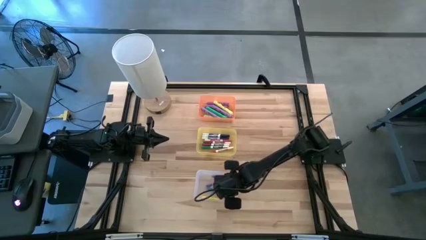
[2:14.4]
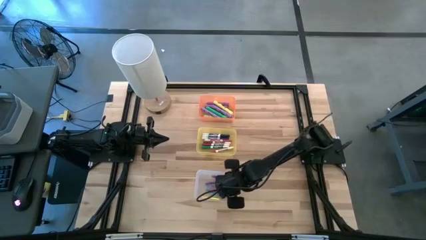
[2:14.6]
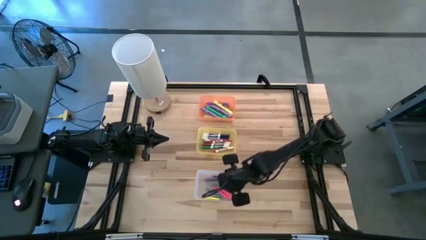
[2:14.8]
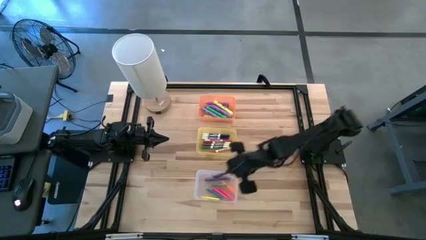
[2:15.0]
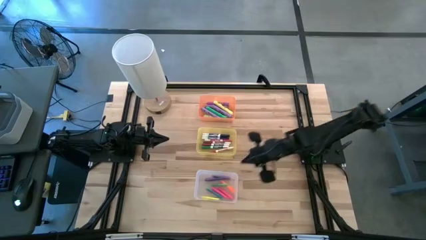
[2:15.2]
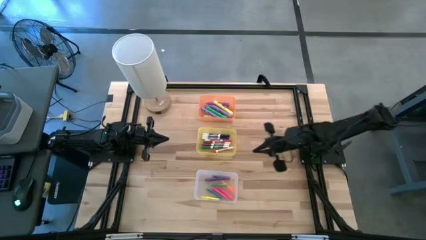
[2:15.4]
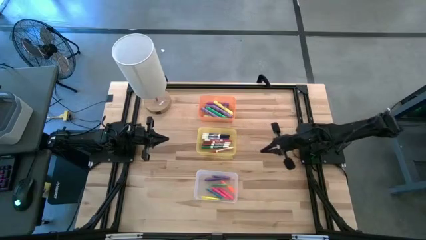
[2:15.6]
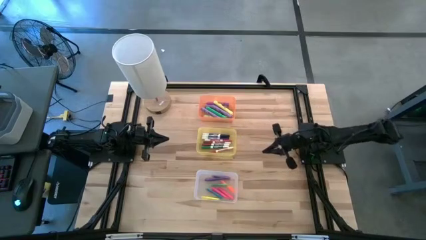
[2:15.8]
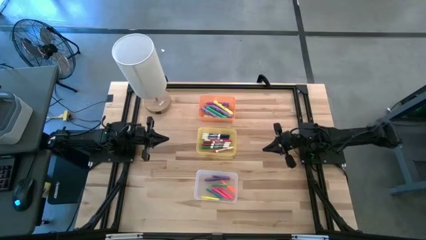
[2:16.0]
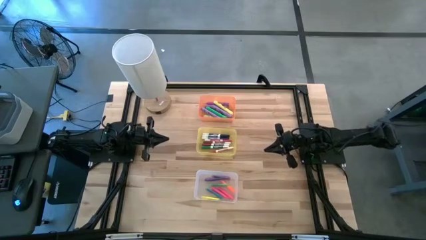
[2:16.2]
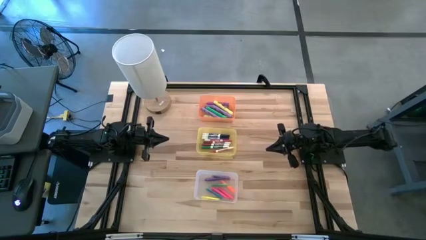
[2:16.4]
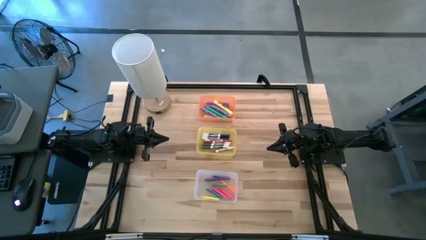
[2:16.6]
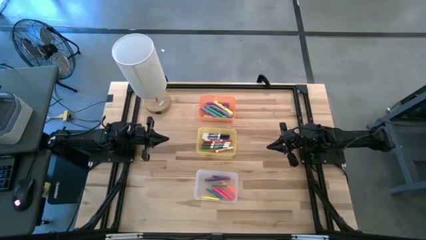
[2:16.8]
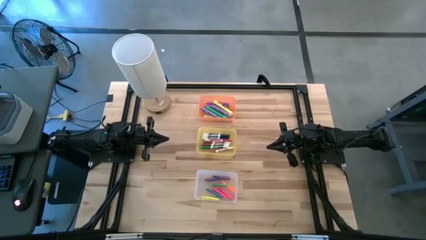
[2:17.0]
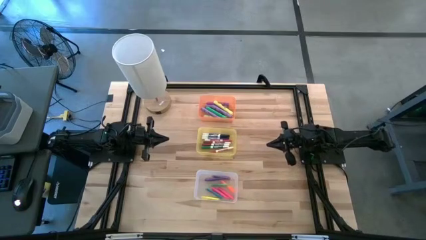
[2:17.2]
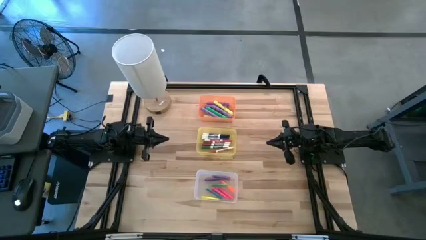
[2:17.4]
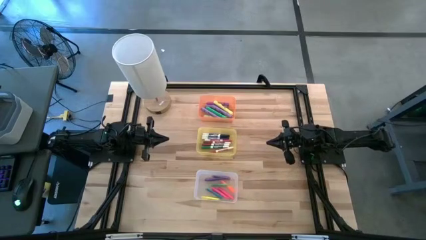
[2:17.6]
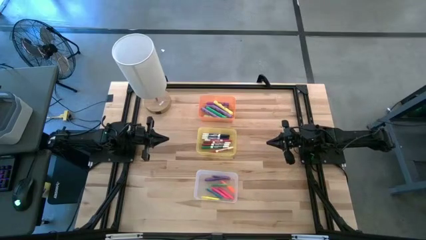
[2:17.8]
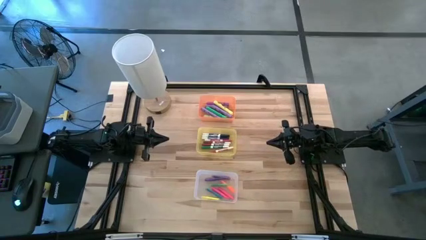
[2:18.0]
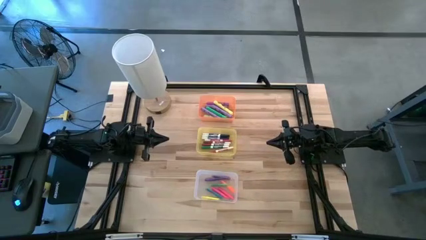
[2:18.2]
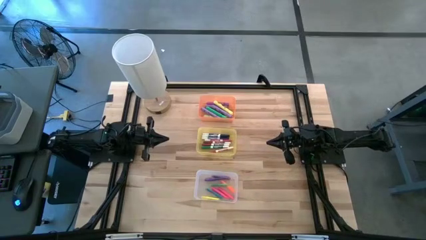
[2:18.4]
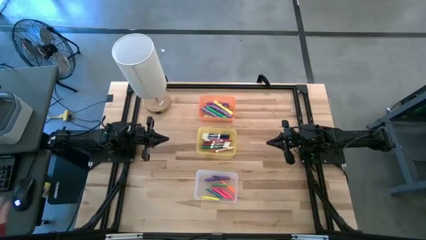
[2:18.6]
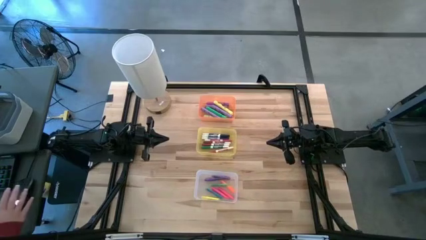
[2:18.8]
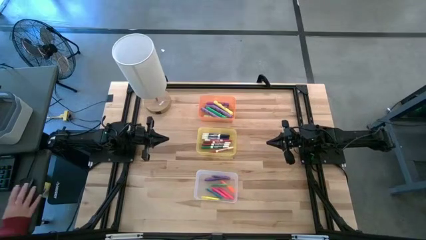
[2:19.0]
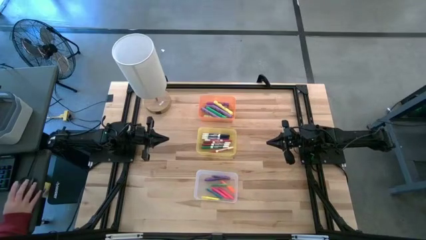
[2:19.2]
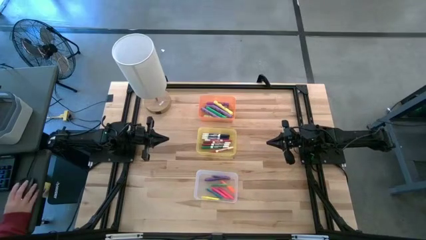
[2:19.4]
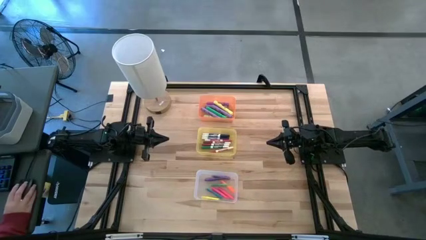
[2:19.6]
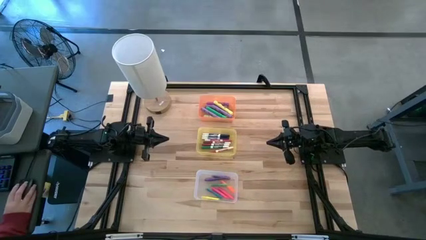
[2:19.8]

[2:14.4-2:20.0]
Task: Pick & Place Markers
Return to Home Position

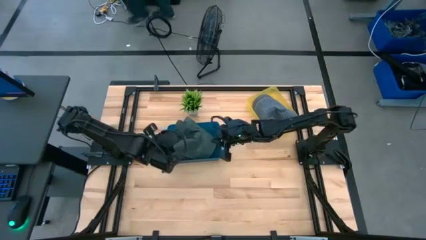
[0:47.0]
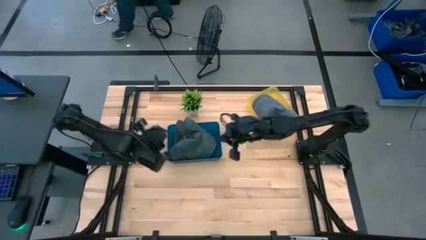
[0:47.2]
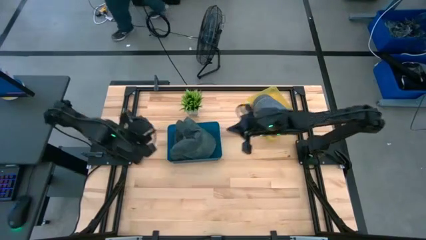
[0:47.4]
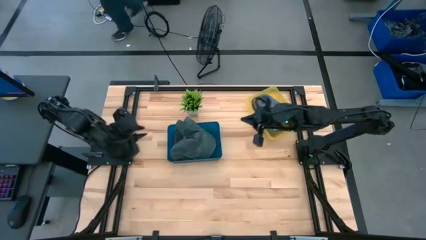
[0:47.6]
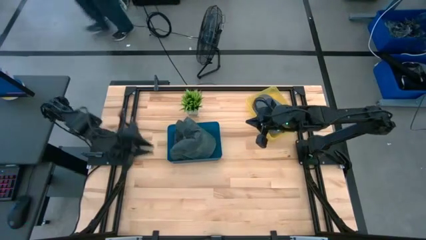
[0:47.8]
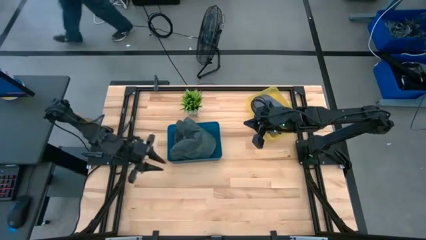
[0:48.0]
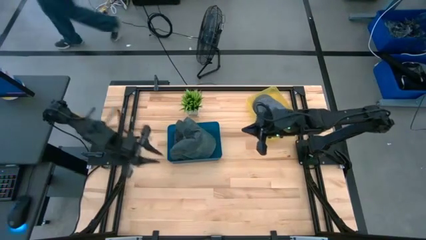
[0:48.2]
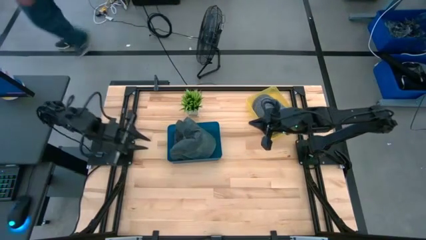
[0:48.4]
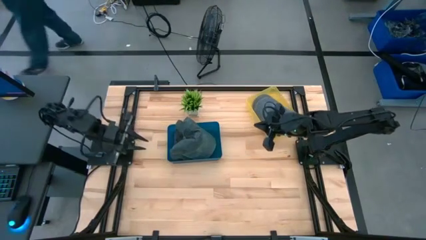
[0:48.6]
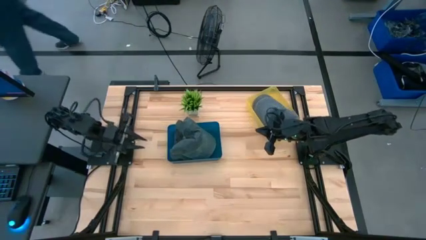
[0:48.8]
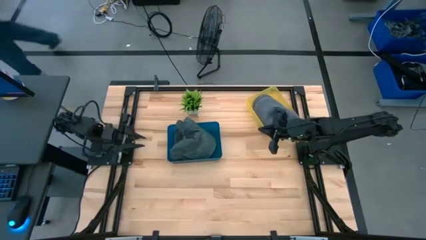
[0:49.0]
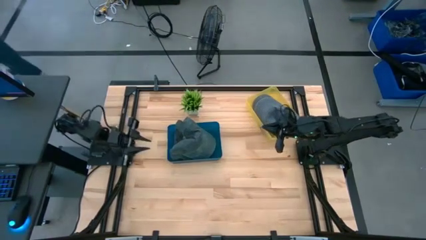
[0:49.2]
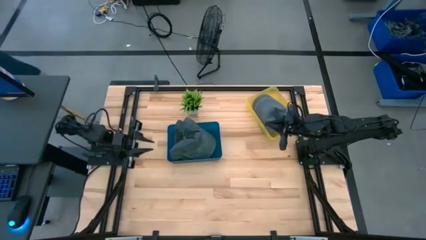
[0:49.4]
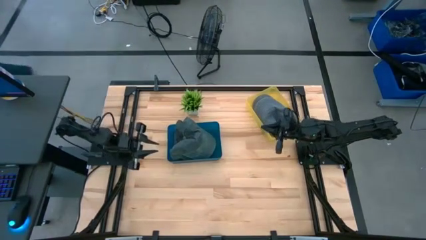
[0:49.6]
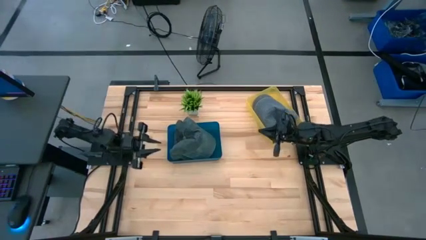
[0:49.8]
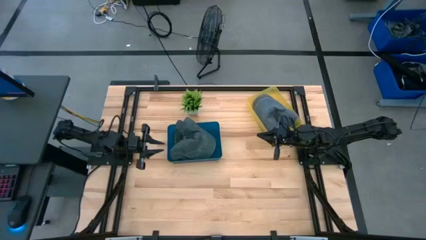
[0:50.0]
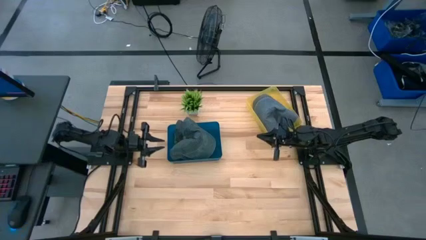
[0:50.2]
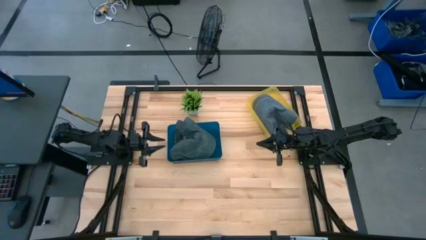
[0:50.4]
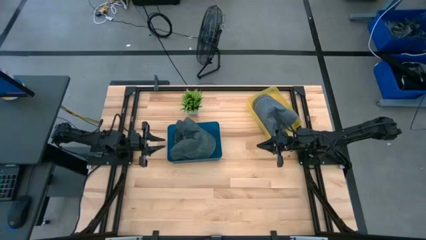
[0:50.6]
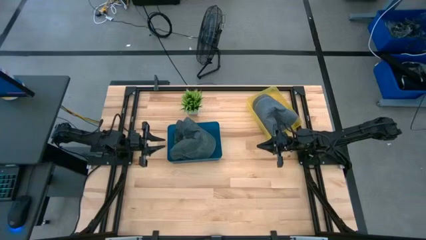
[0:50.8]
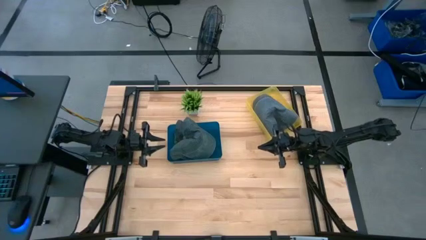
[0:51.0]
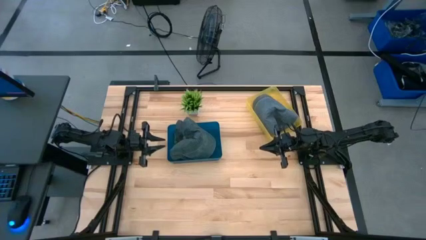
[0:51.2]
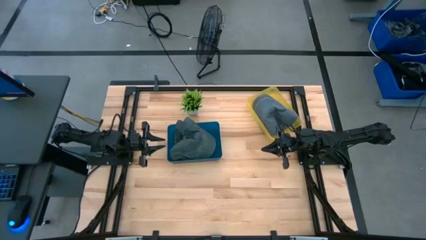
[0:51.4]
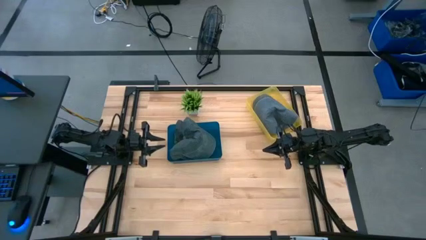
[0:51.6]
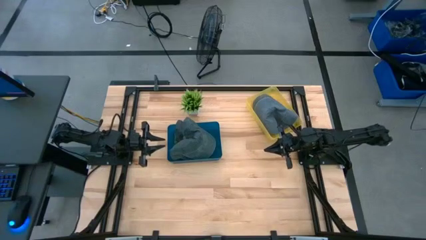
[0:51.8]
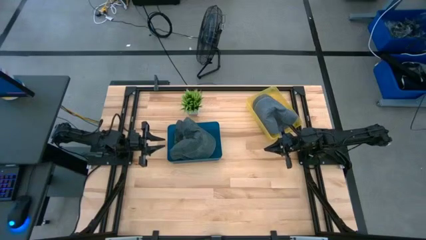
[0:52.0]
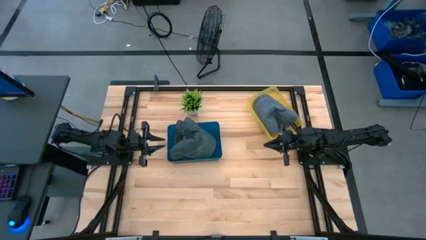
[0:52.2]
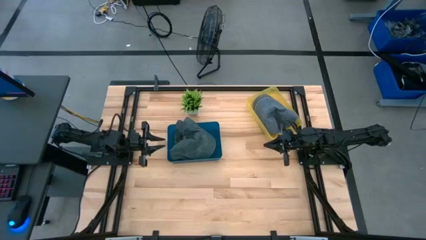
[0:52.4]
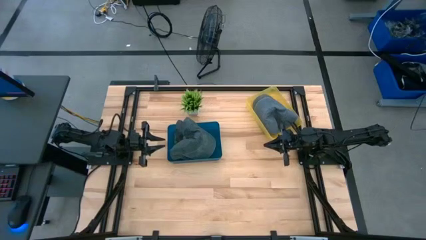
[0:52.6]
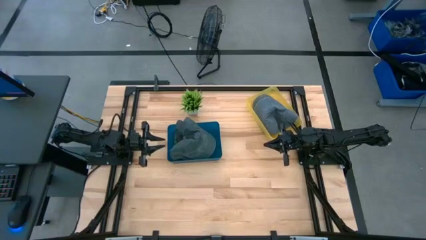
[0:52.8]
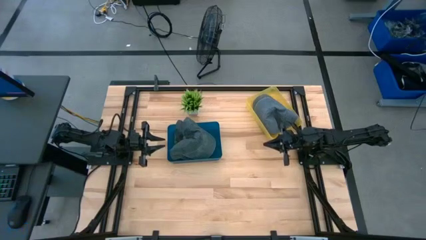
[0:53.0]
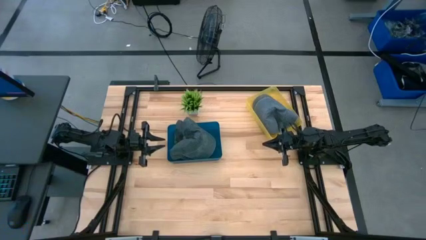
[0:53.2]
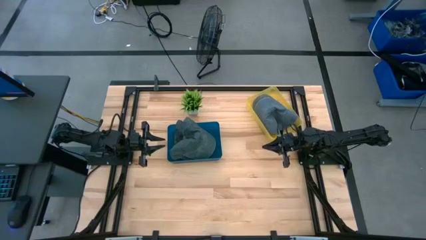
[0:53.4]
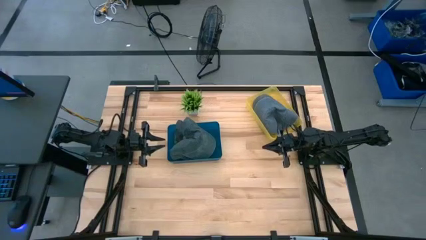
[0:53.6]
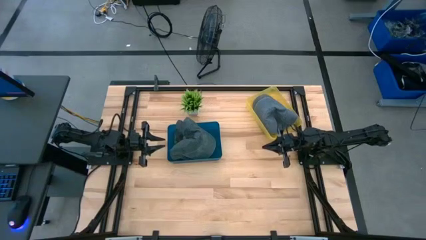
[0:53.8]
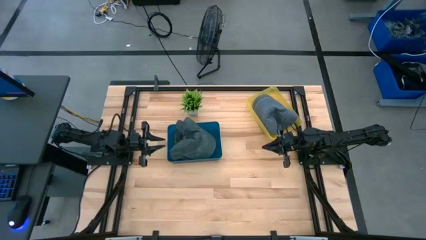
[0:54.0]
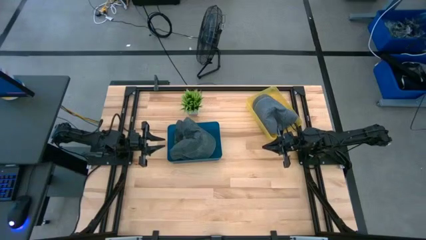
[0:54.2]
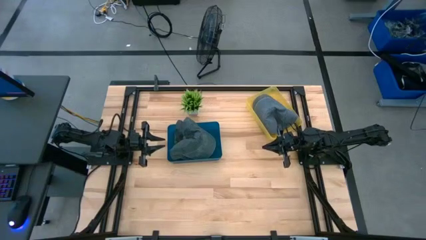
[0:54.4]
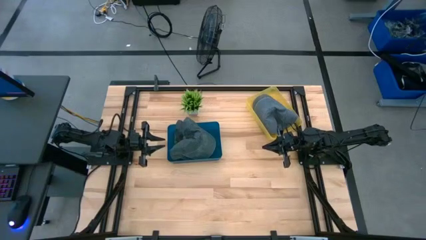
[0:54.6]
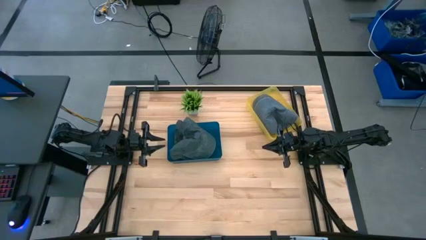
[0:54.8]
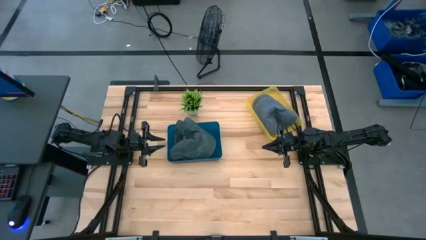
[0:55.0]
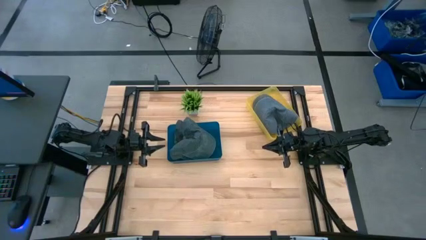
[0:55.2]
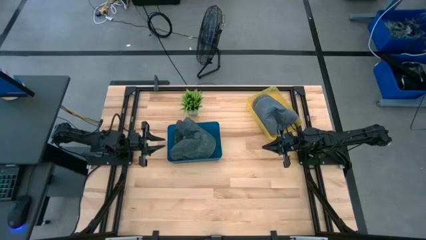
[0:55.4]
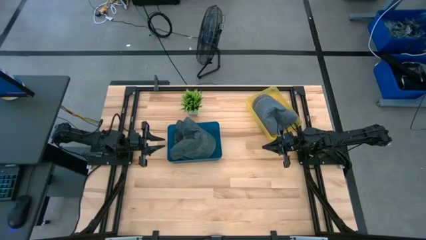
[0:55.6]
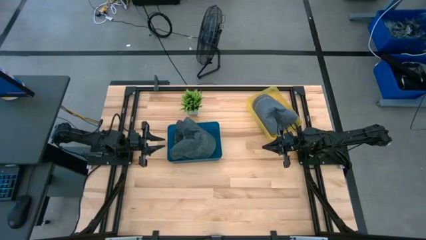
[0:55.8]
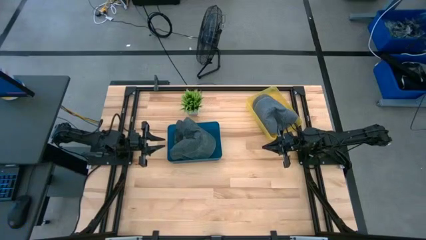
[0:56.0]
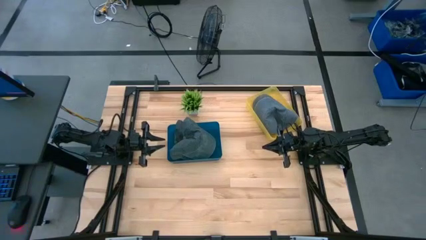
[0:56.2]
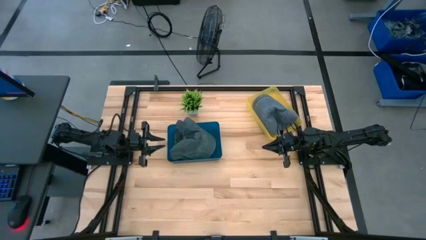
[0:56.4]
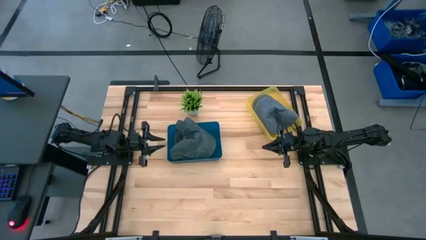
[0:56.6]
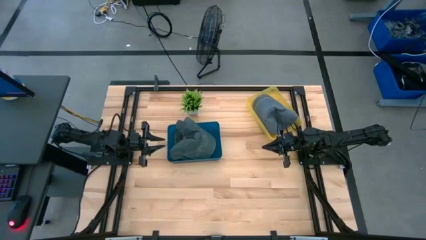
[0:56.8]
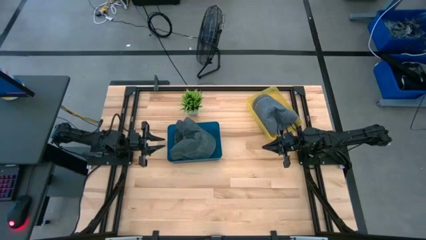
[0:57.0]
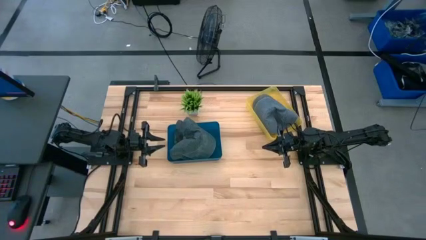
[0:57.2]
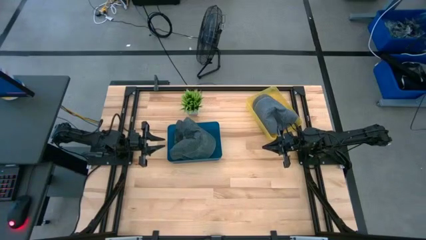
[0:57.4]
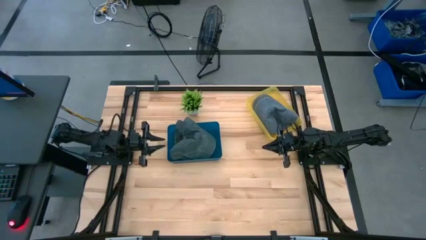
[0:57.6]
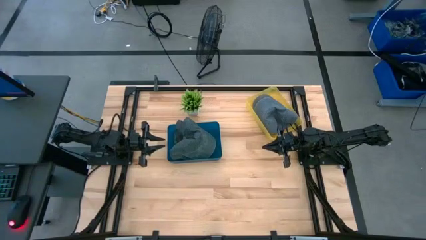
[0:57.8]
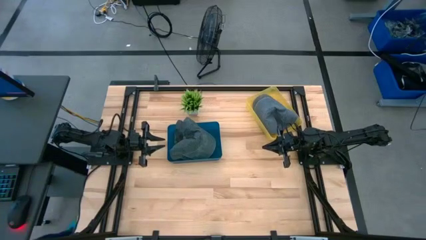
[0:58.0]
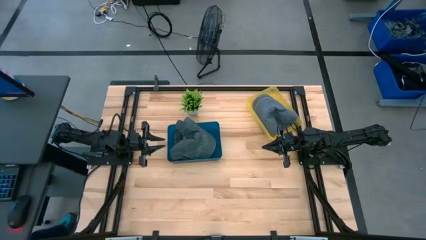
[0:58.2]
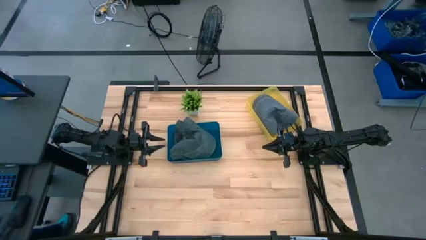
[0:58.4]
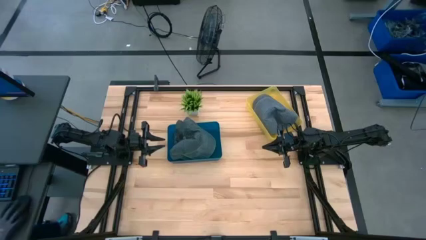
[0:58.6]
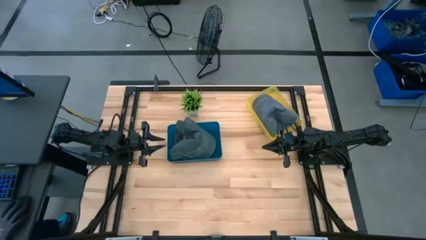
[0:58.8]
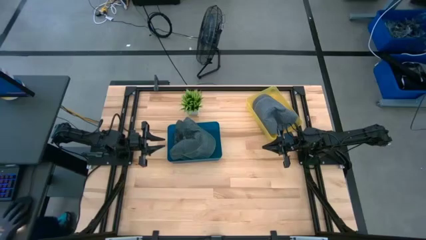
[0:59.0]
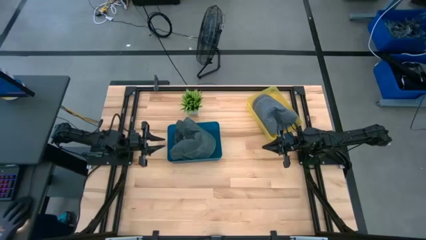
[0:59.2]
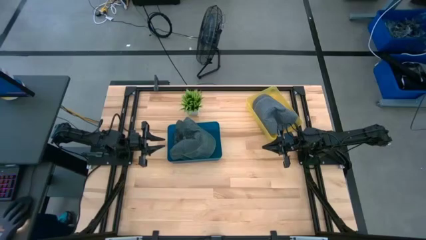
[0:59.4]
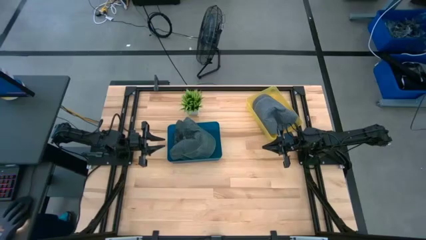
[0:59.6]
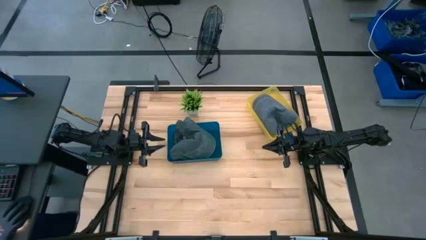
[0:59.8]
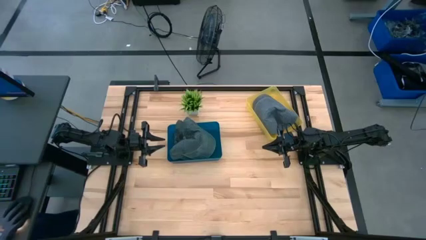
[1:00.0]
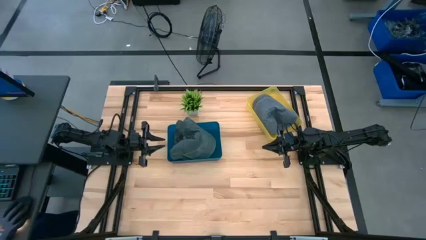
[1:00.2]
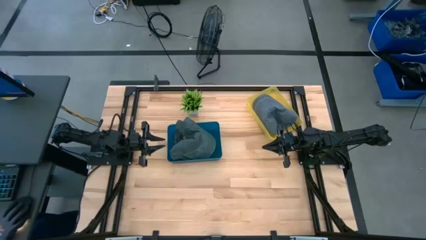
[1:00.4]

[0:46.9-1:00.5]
Task: Pick & Place hat
Return to Home Position
